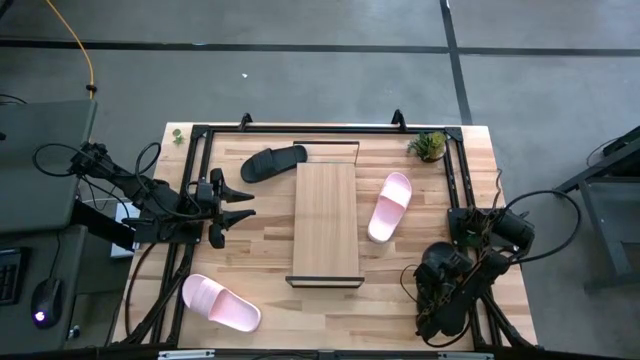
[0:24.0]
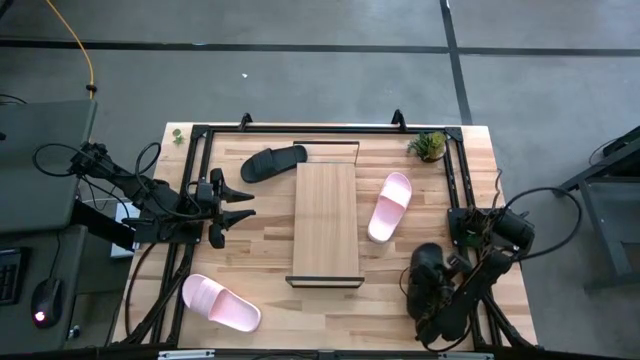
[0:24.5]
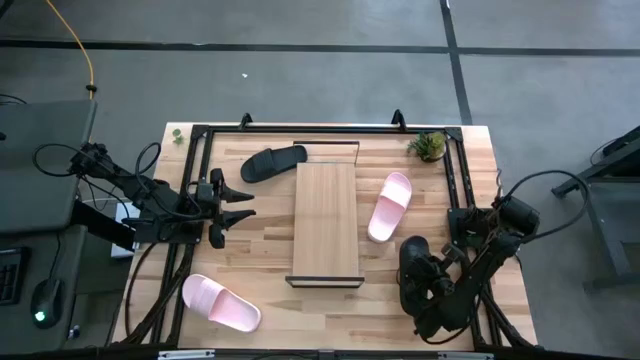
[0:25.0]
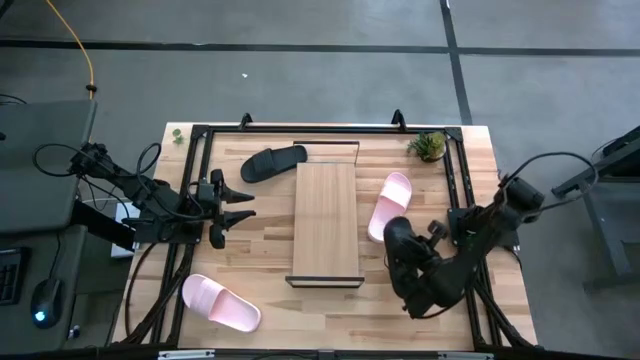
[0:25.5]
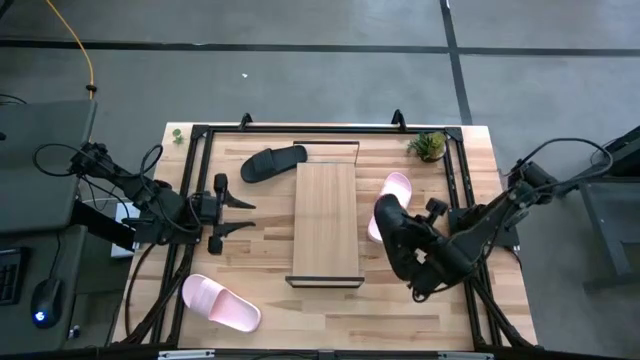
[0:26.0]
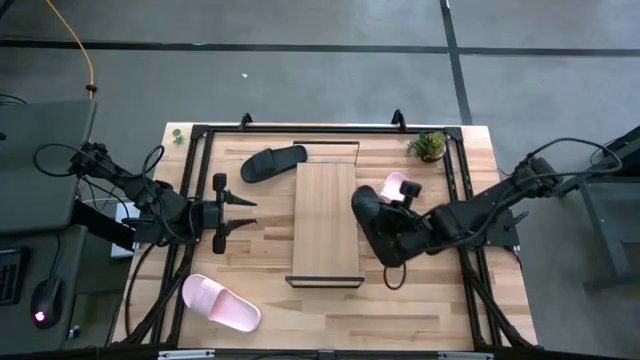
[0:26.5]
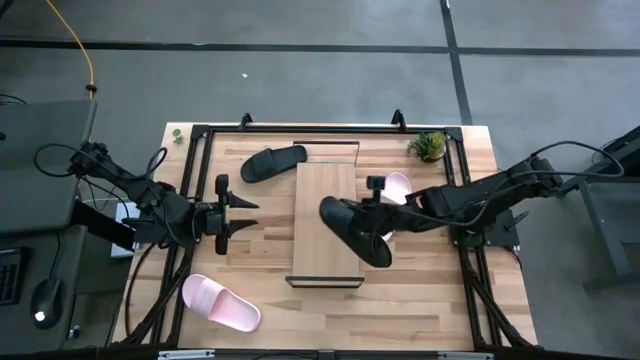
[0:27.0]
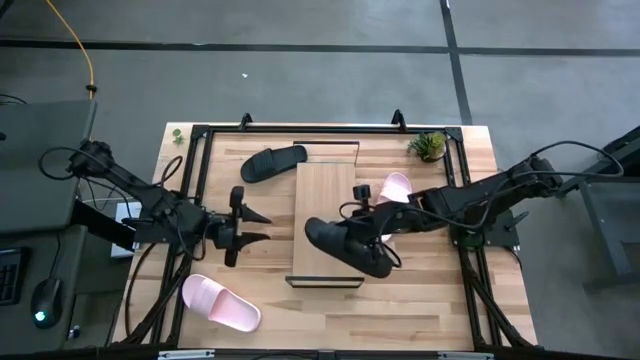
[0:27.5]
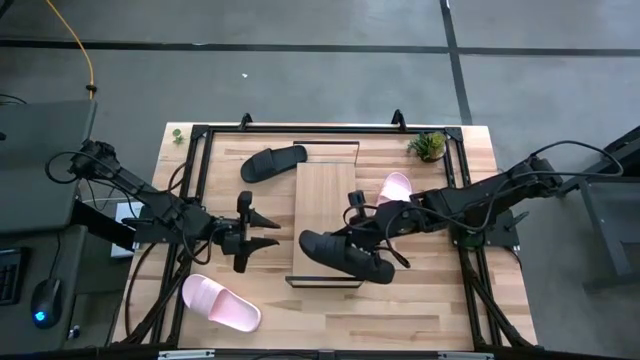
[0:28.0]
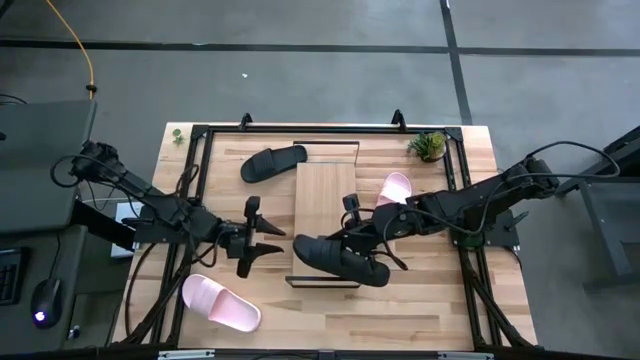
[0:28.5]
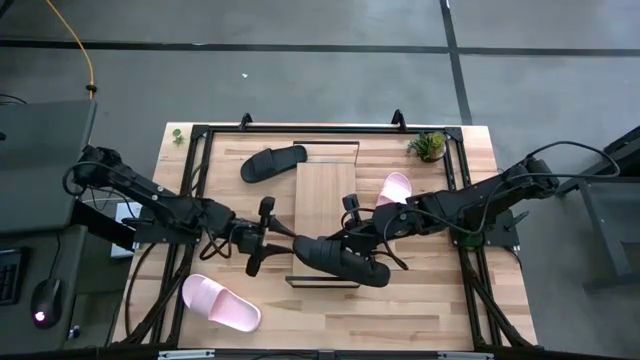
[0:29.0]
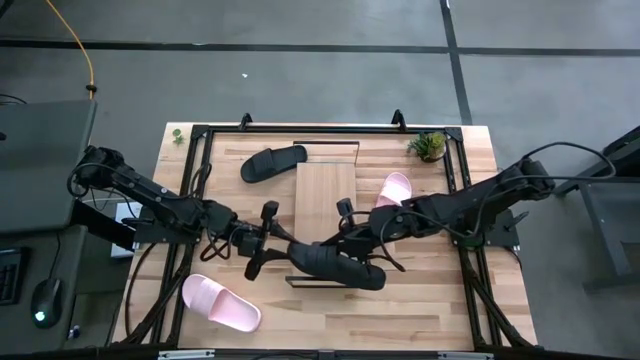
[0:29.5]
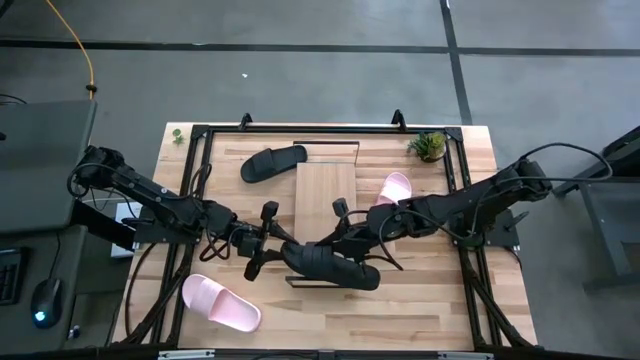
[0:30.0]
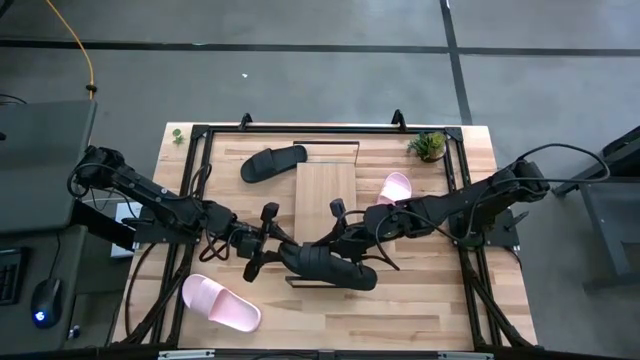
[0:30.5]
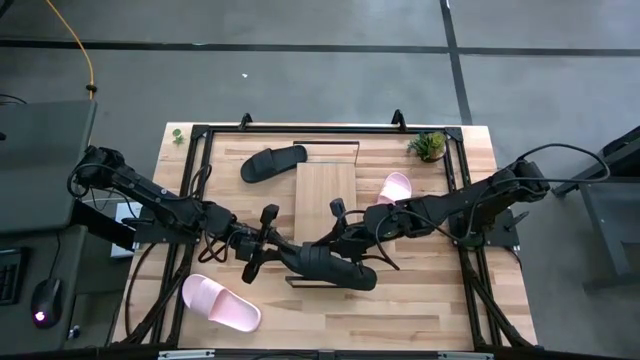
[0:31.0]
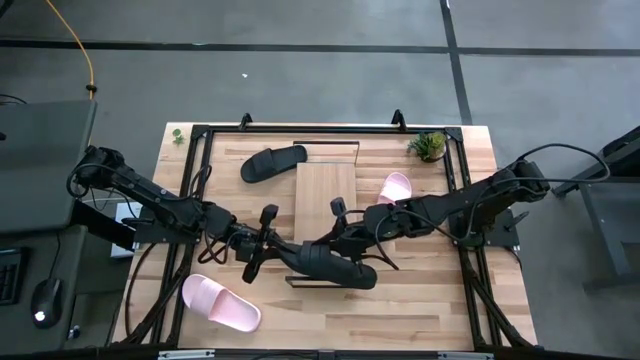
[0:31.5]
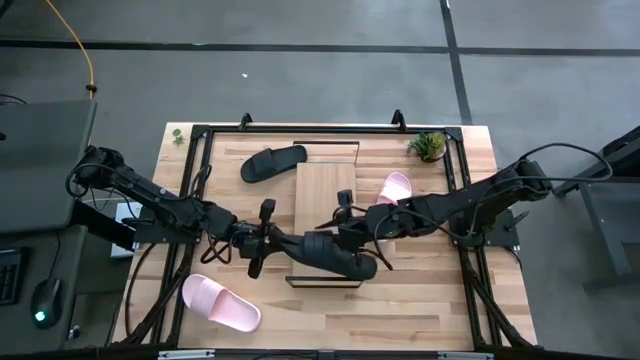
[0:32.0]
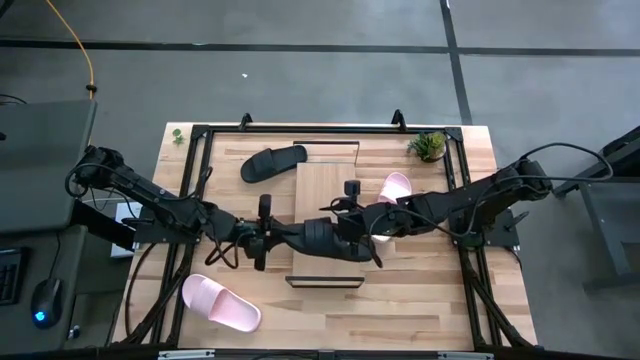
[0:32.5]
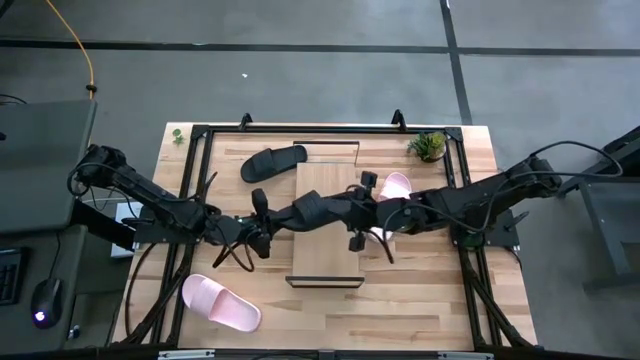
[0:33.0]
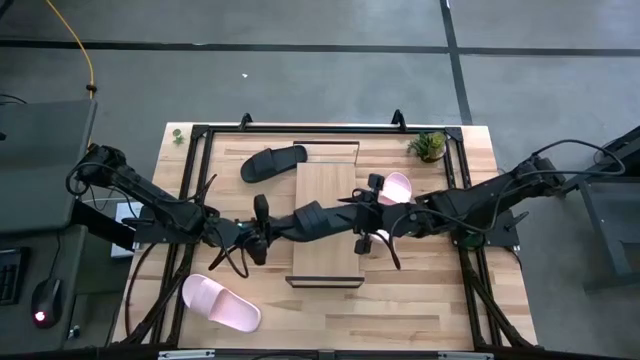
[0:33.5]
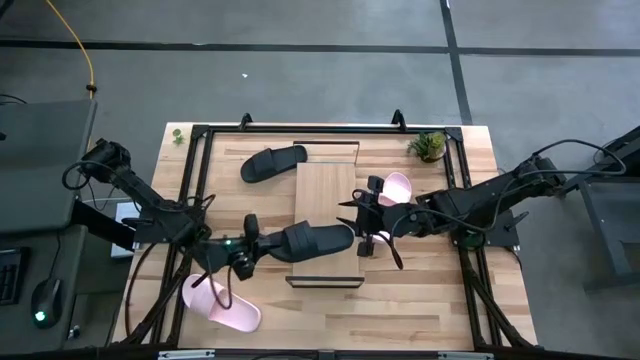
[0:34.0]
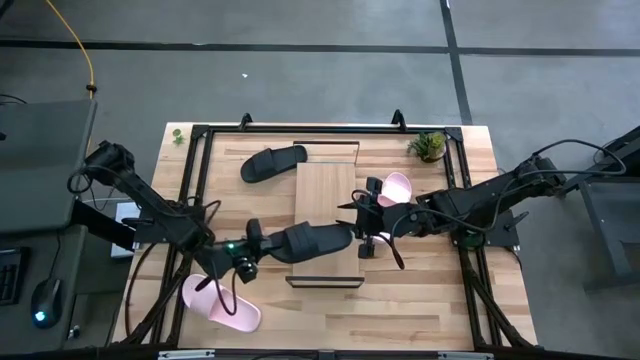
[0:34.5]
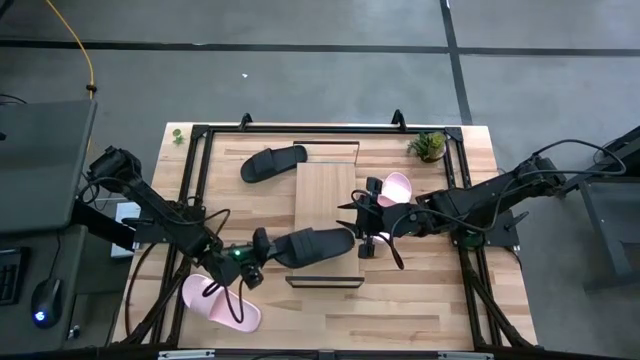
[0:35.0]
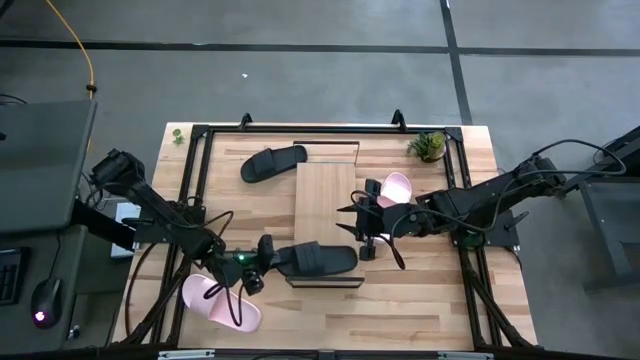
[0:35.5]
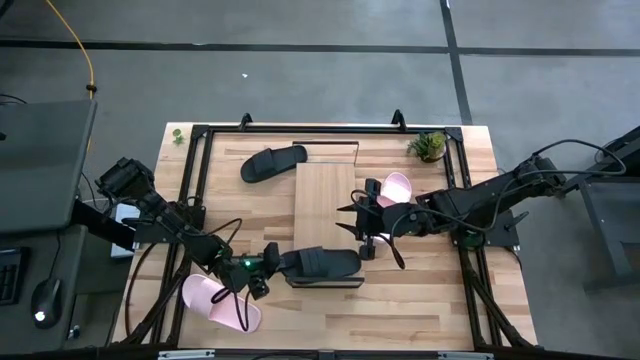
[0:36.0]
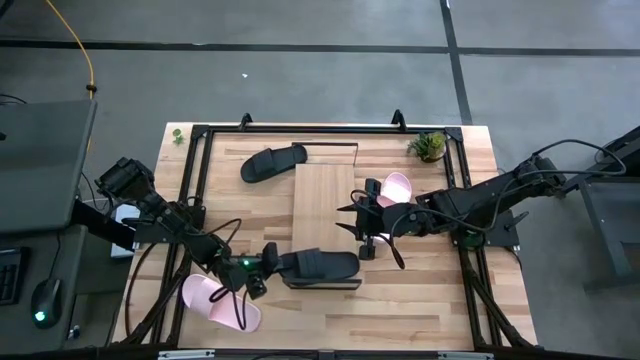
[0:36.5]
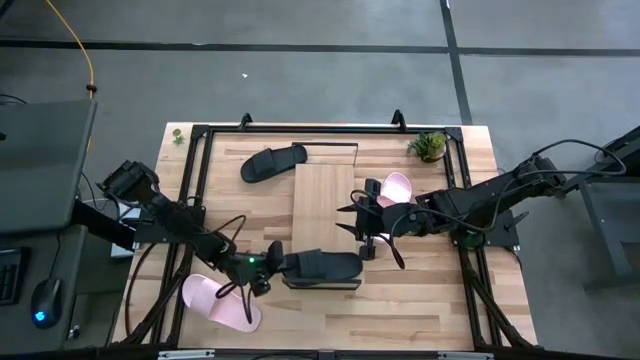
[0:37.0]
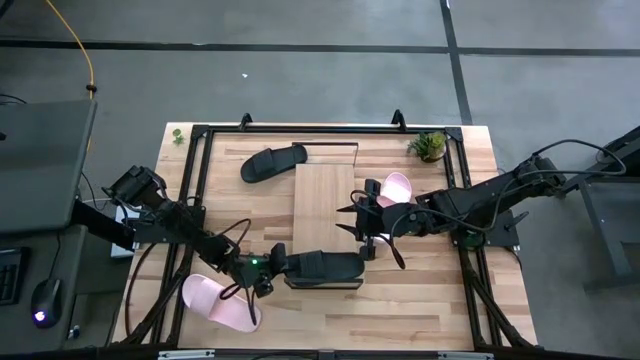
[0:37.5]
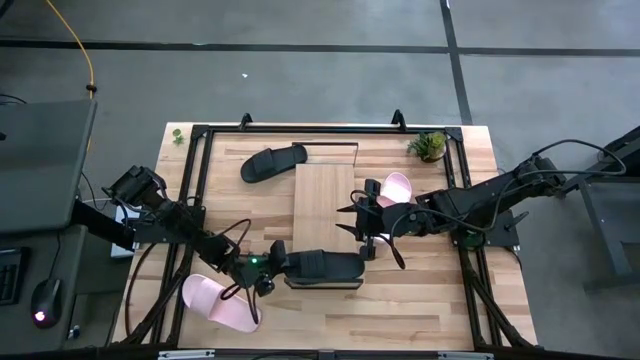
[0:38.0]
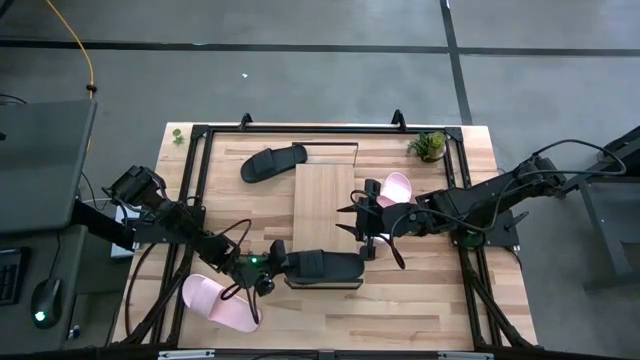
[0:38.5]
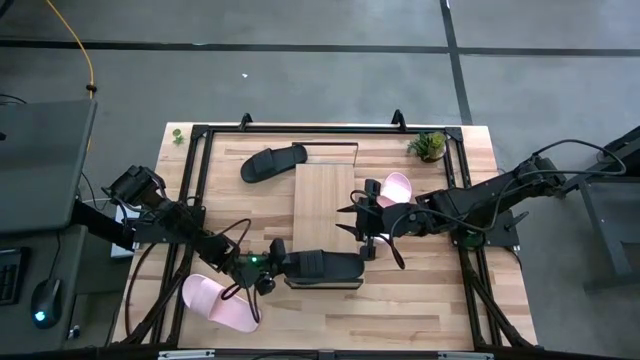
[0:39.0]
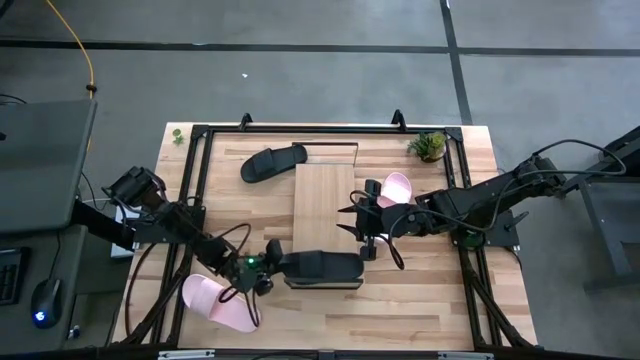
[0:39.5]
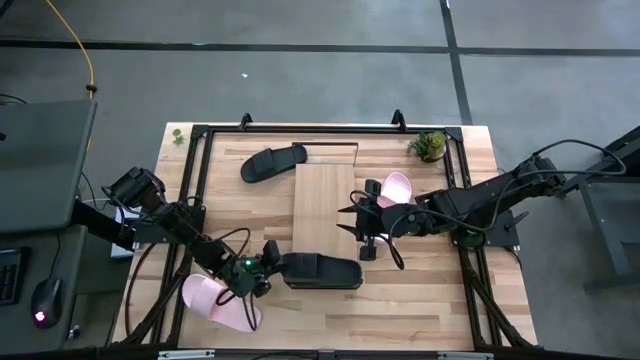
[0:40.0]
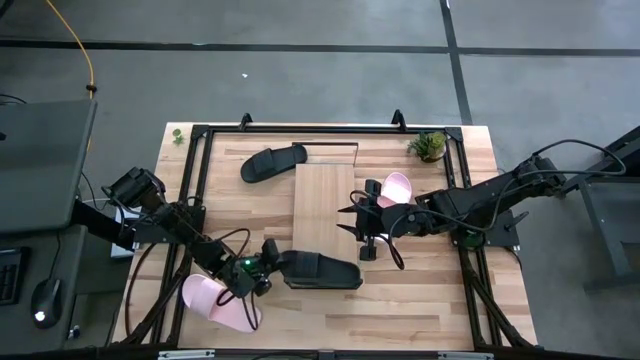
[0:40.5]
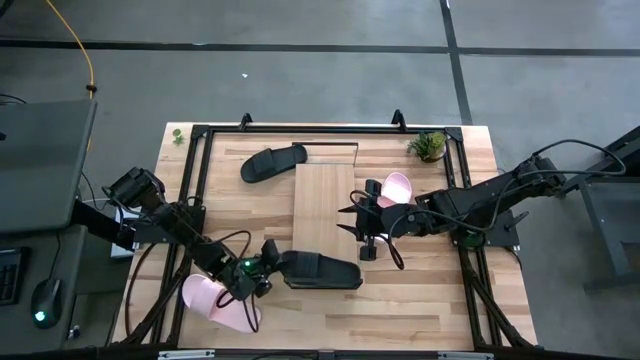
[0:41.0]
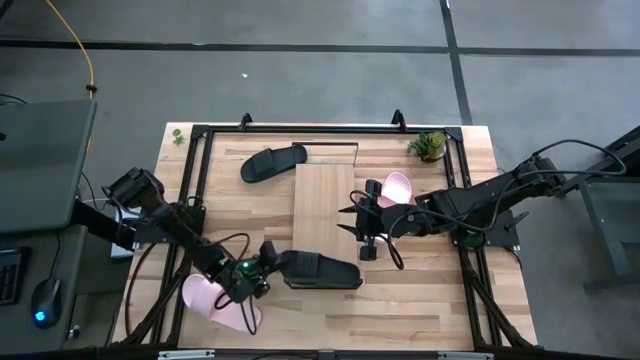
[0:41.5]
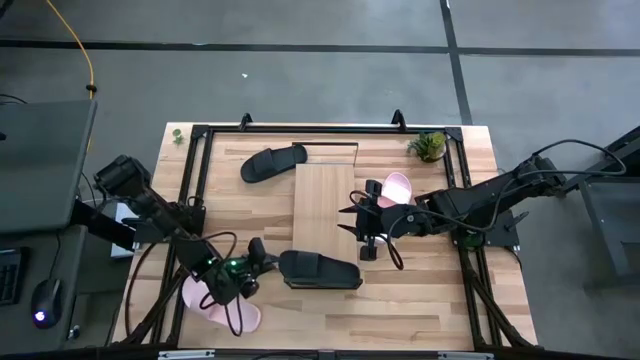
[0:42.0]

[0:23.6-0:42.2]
Task: Pick and place slides into the shelf
Put the bottom black slipper on the shelf

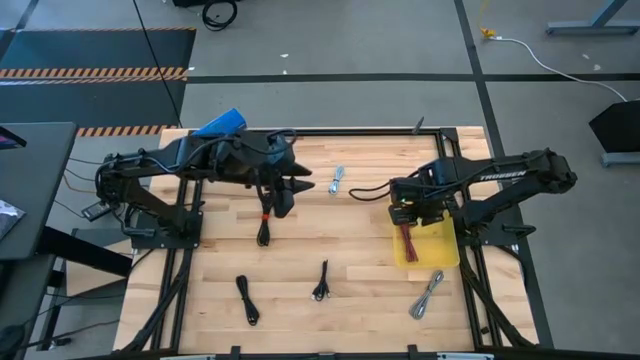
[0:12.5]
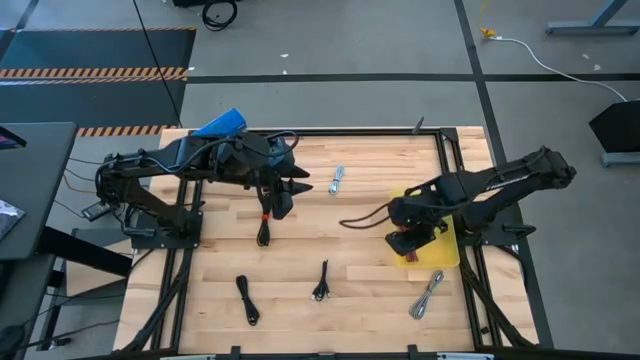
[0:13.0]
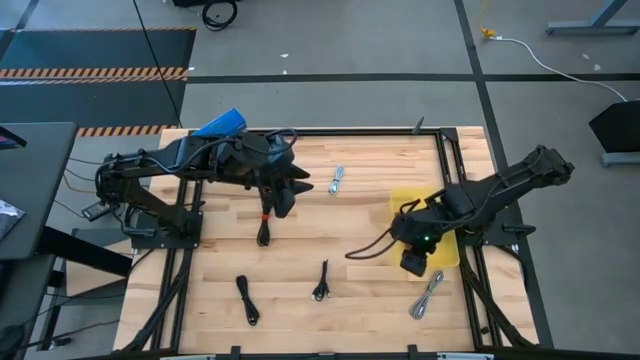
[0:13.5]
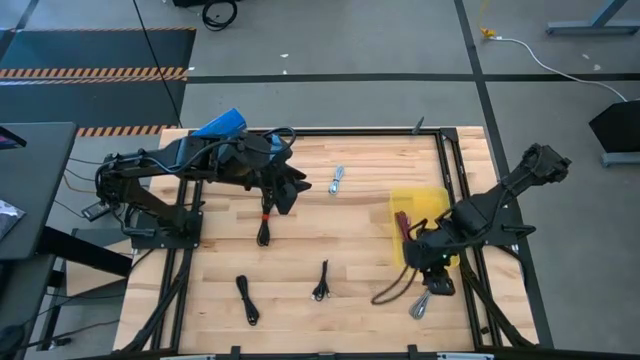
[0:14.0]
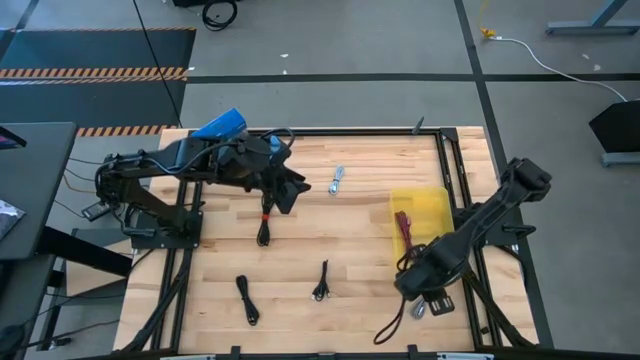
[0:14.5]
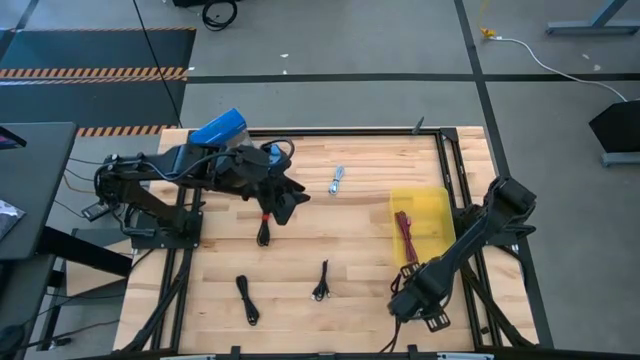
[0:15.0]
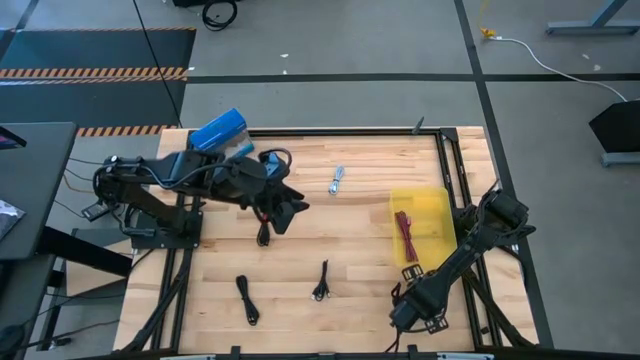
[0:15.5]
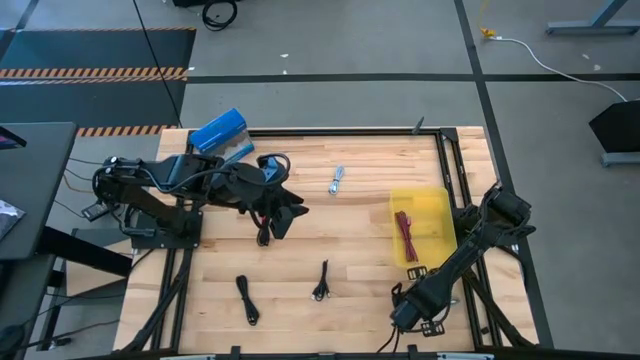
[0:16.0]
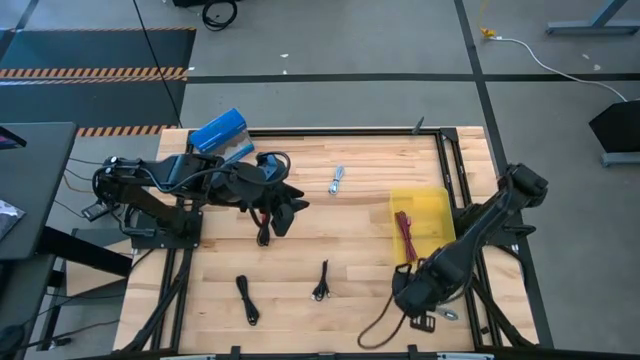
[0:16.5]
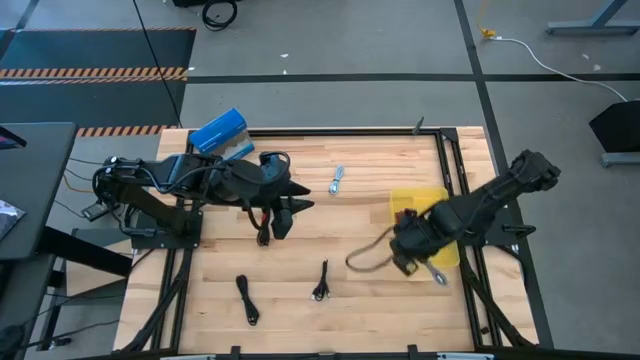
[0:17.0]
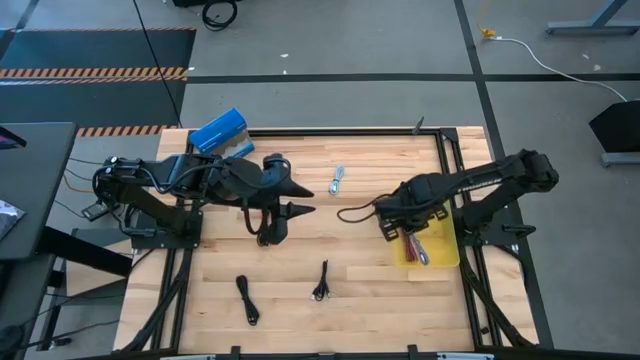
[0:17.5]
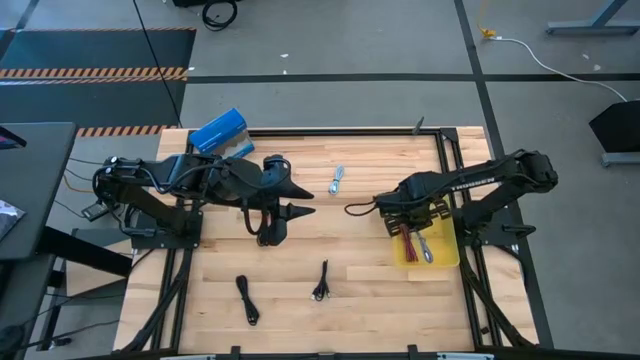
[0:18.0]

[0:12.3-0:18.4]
Task: Pick and place USB-C Cables
Put the white stripe charger cable into the yellow bin
